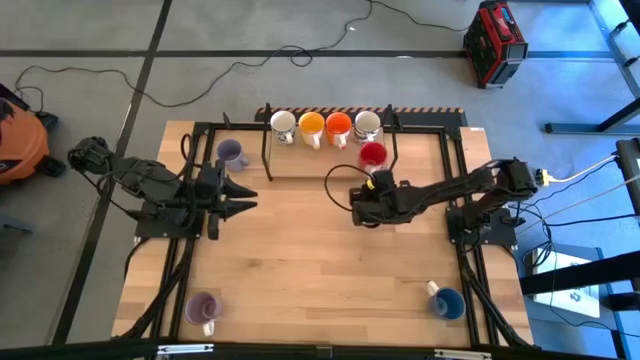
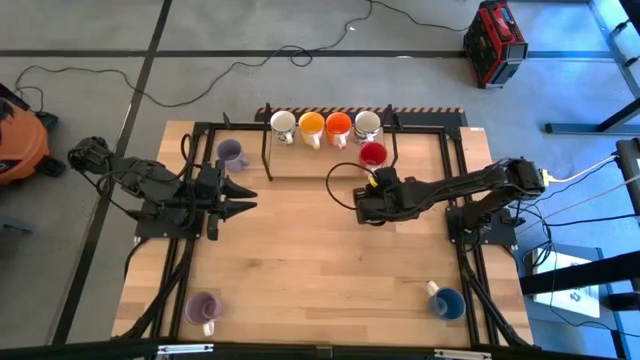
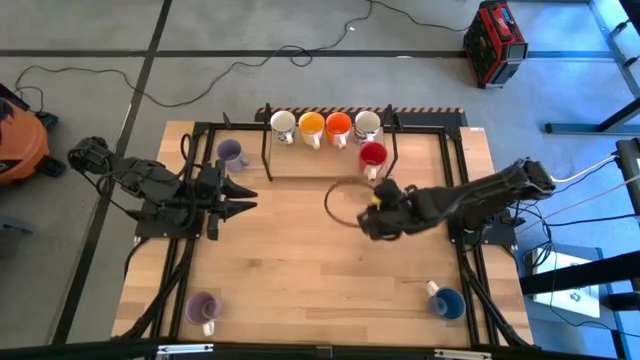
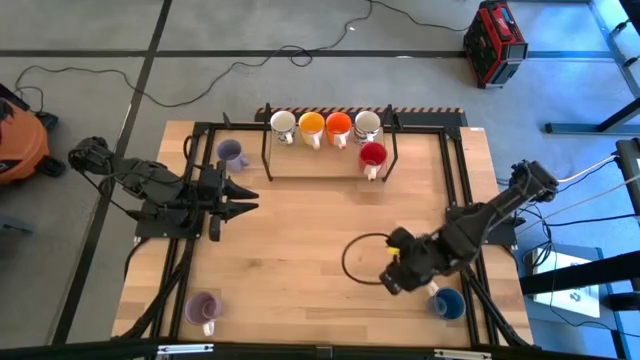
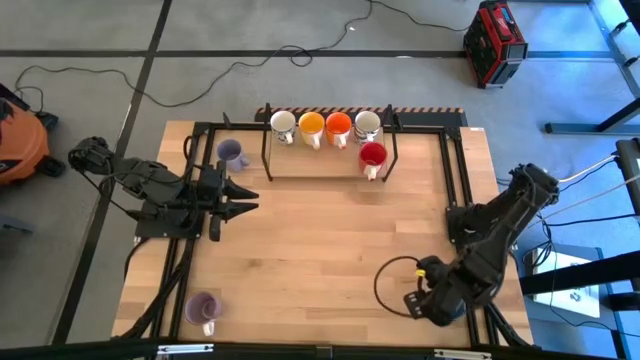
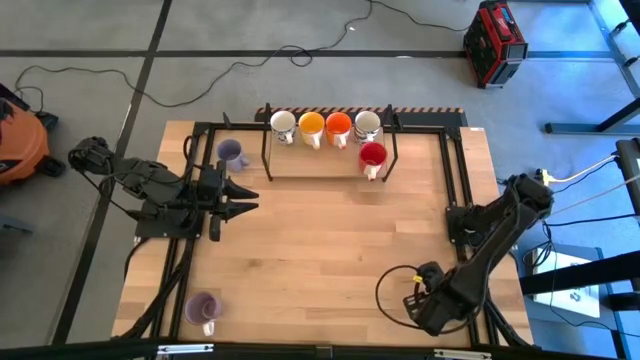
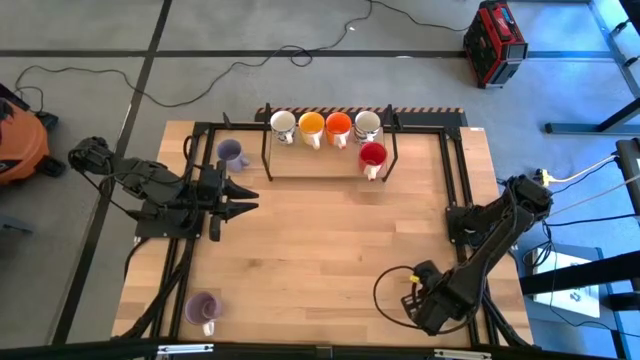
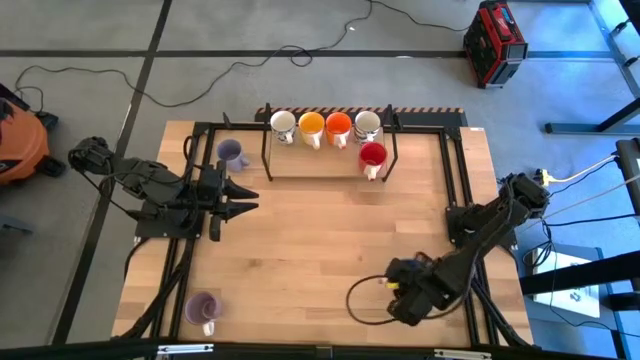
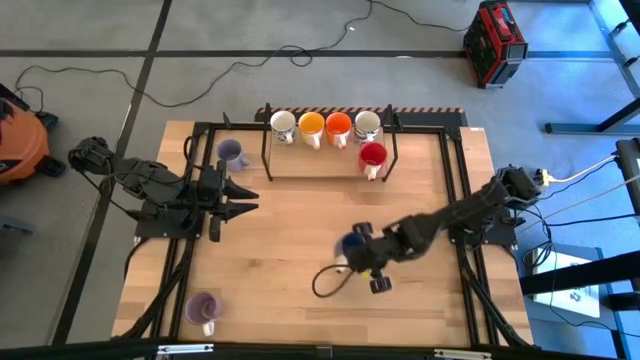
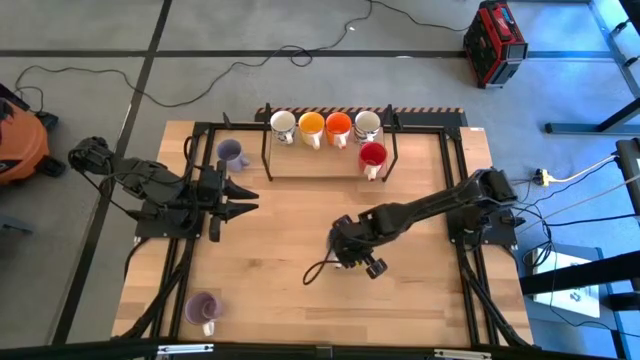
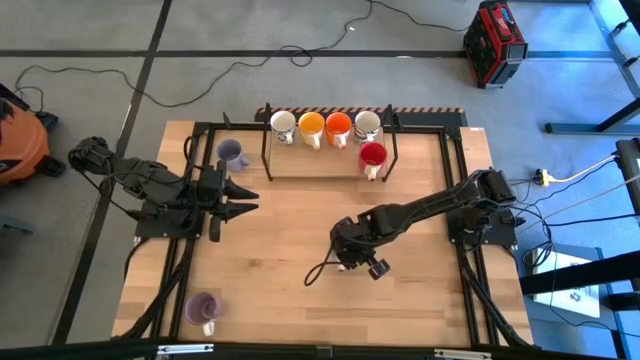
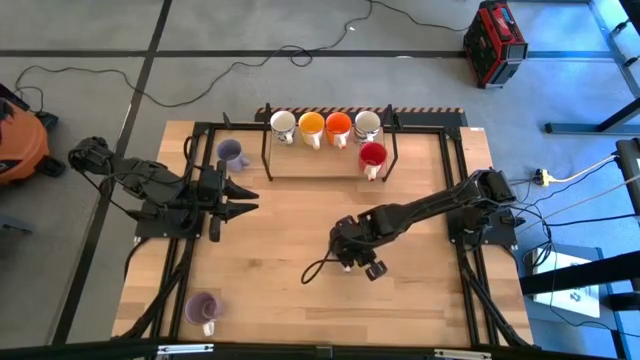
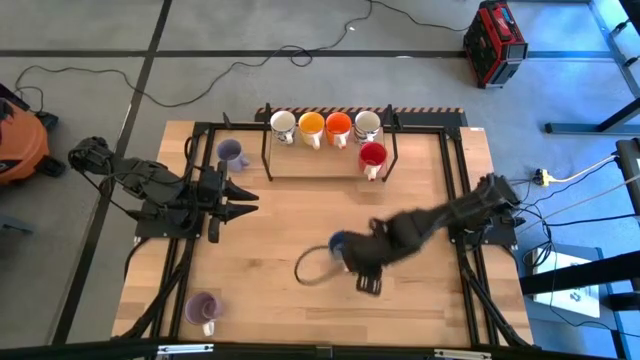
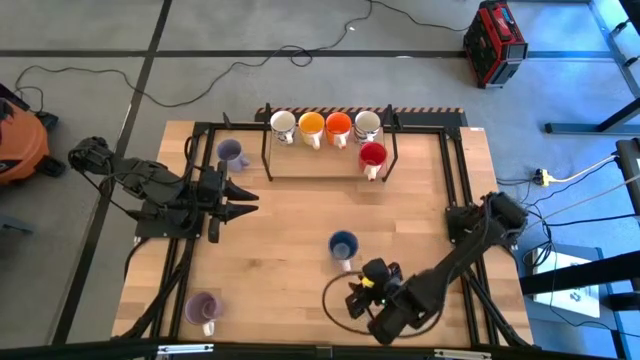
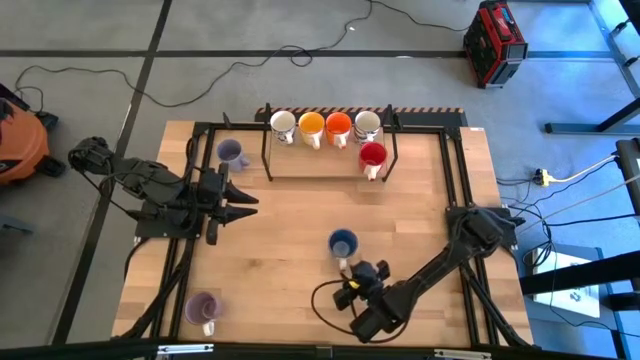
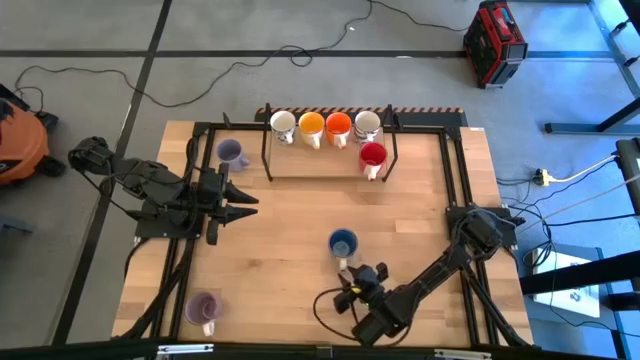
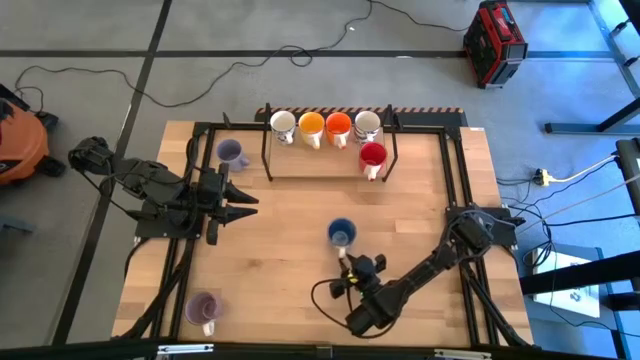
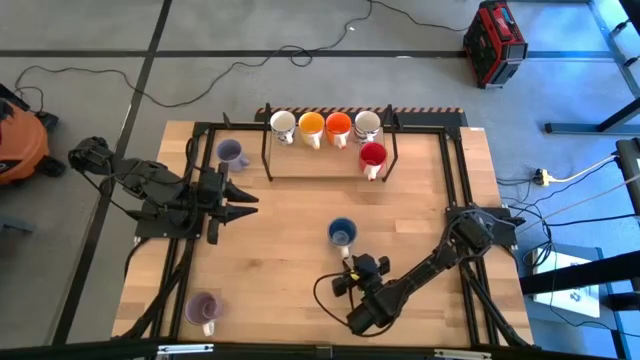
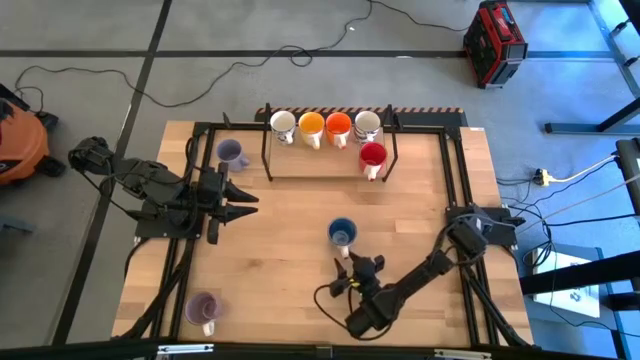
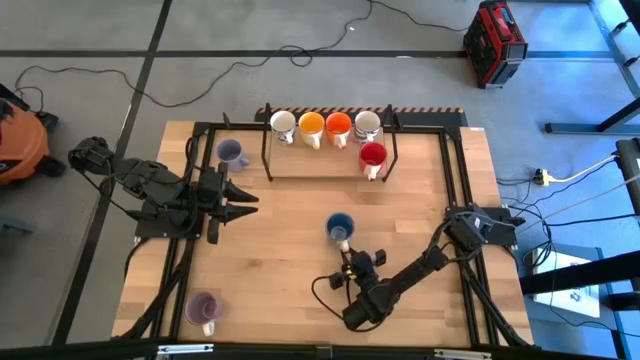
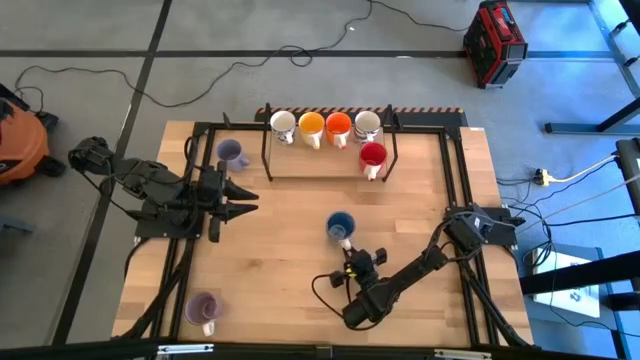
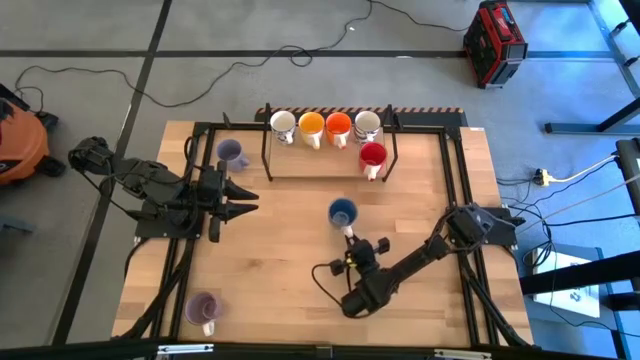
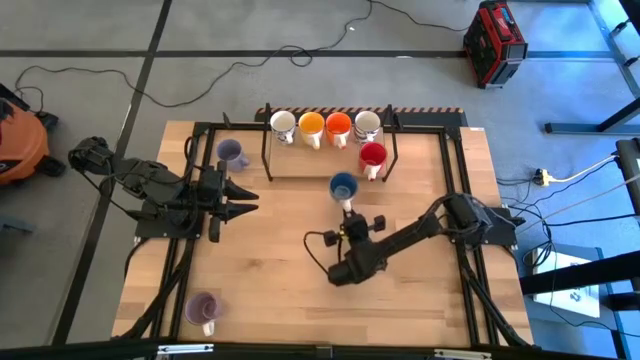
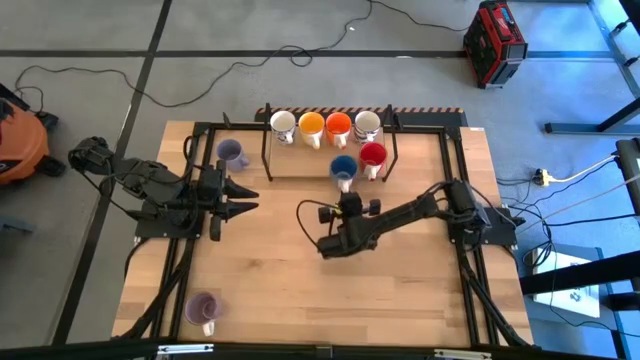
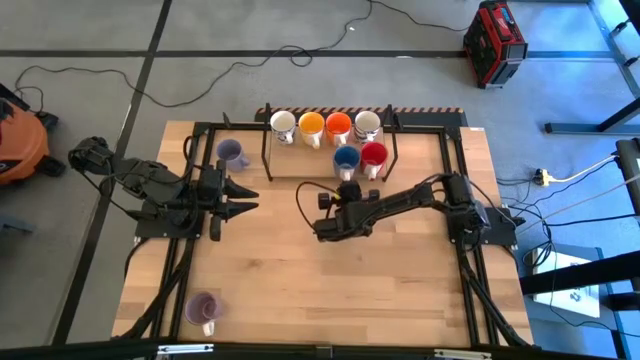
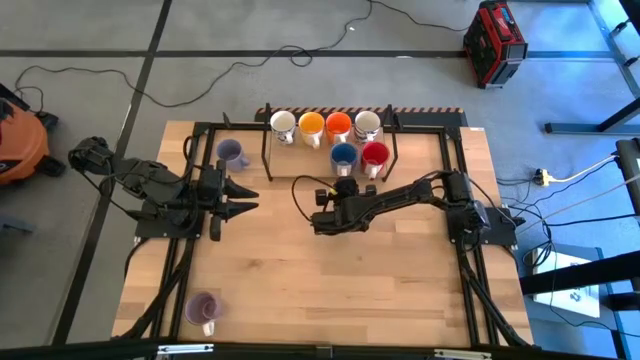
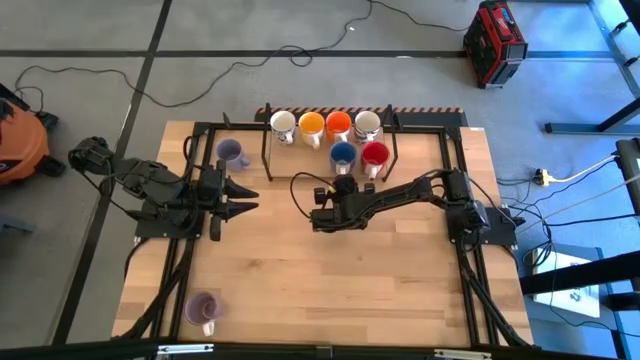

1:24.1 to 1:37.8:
Task: Place coffee mugs
Put the blue mug on the shelf
